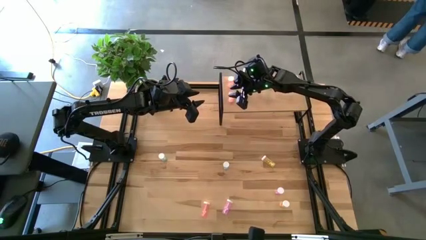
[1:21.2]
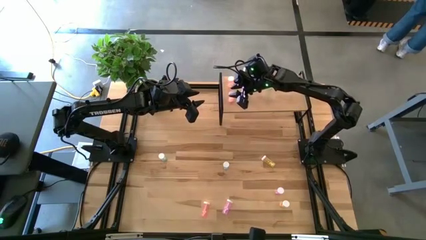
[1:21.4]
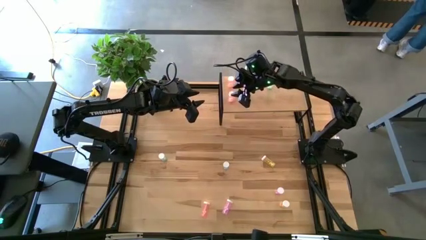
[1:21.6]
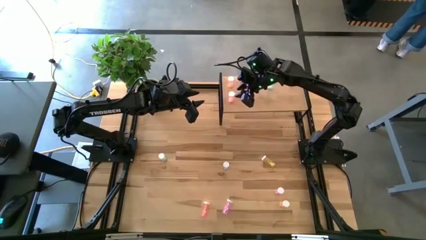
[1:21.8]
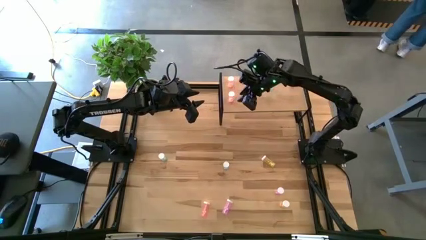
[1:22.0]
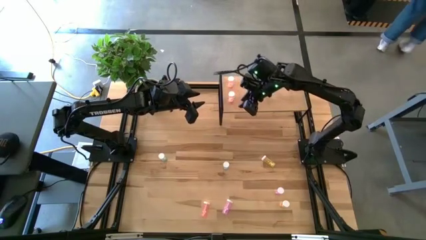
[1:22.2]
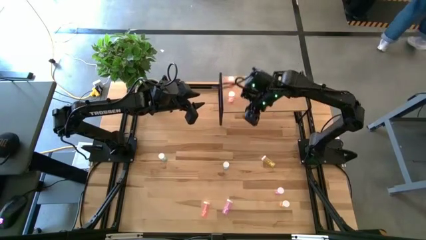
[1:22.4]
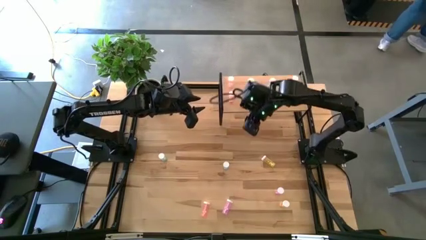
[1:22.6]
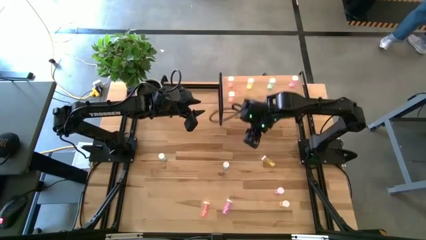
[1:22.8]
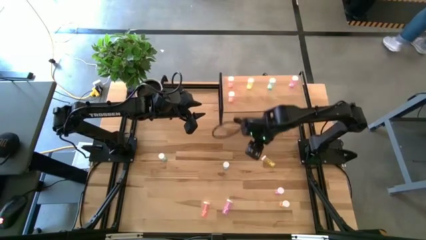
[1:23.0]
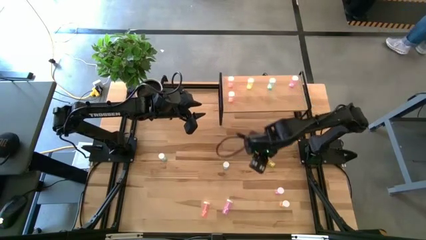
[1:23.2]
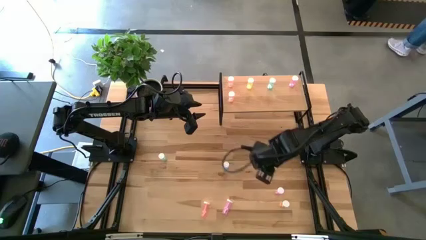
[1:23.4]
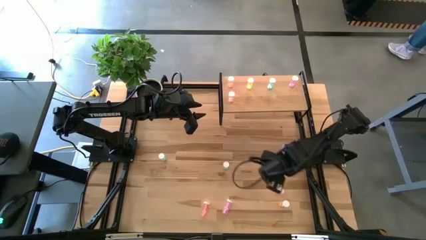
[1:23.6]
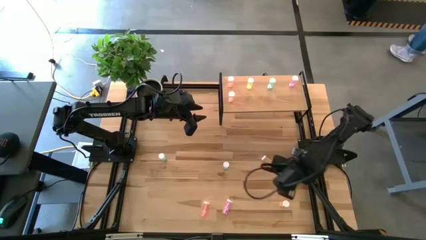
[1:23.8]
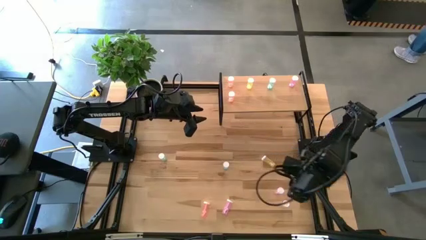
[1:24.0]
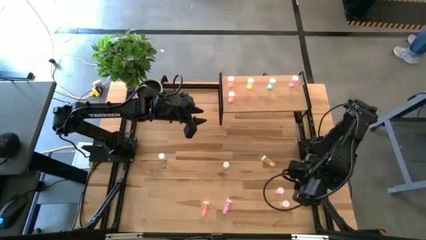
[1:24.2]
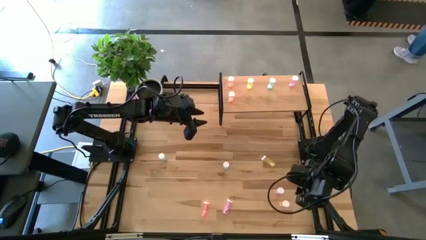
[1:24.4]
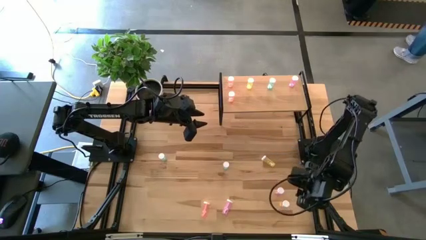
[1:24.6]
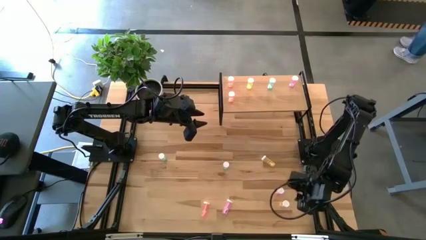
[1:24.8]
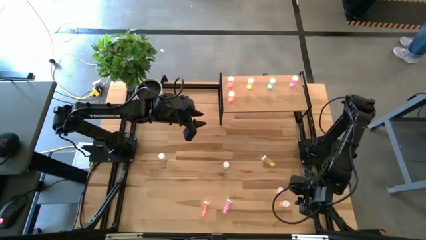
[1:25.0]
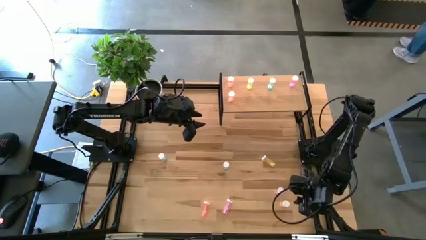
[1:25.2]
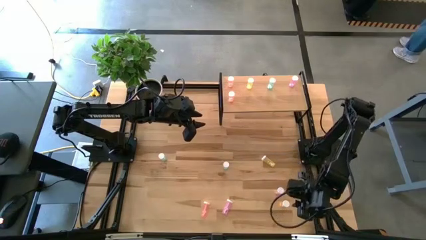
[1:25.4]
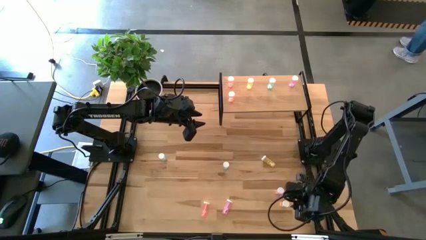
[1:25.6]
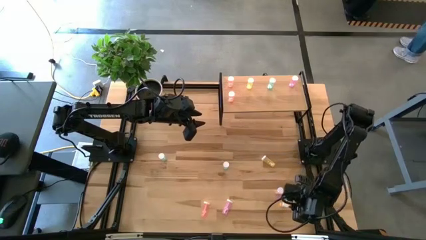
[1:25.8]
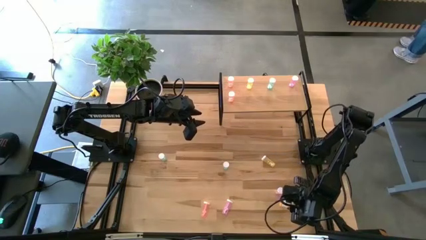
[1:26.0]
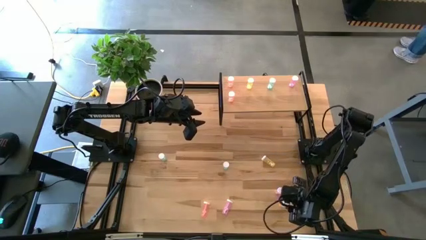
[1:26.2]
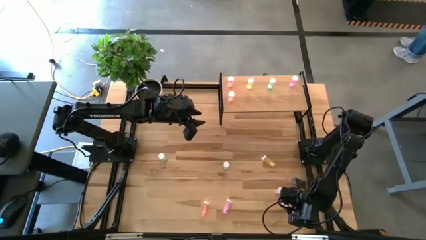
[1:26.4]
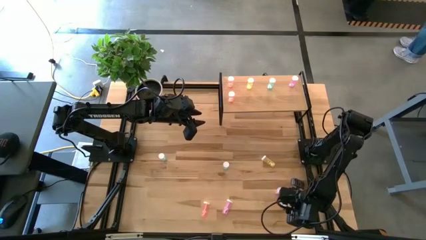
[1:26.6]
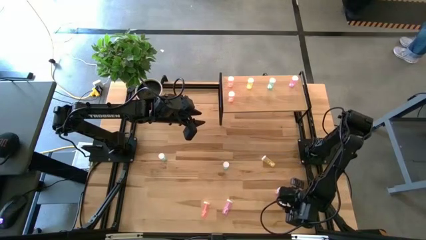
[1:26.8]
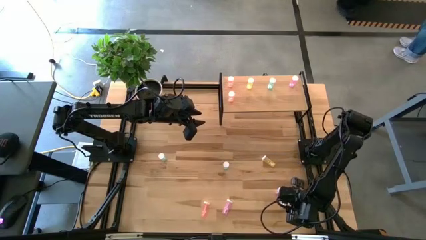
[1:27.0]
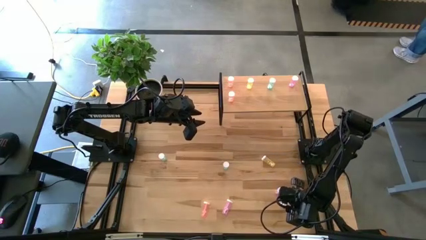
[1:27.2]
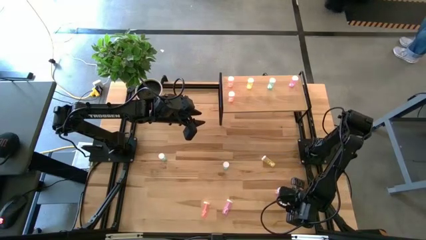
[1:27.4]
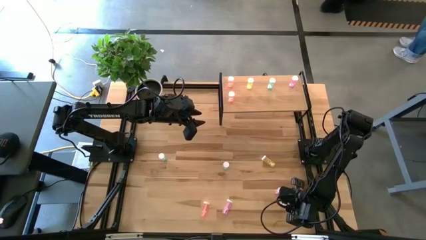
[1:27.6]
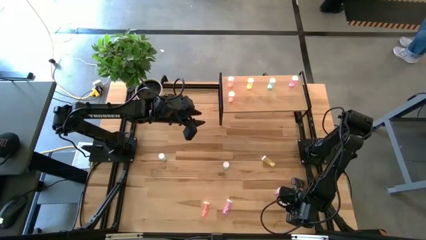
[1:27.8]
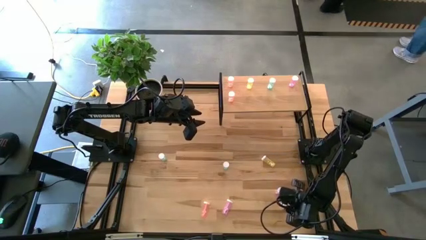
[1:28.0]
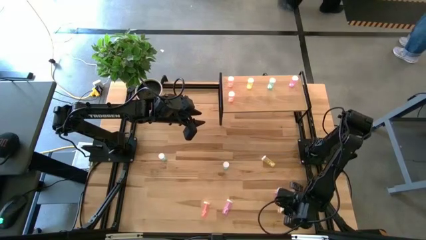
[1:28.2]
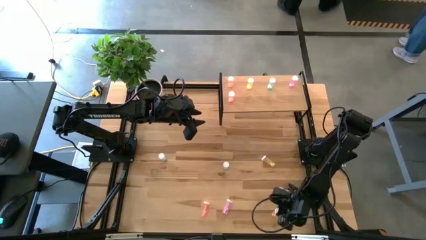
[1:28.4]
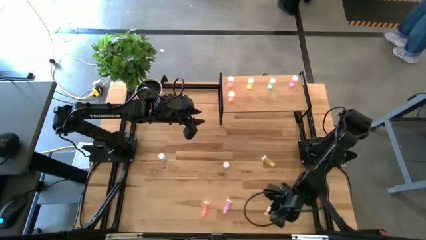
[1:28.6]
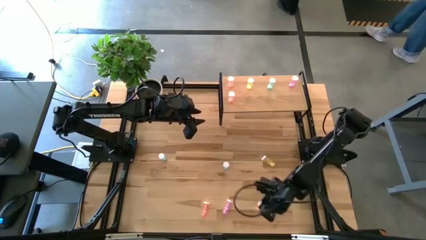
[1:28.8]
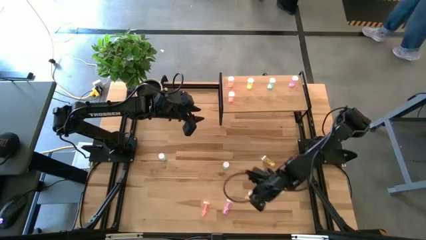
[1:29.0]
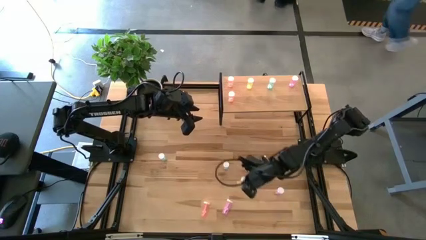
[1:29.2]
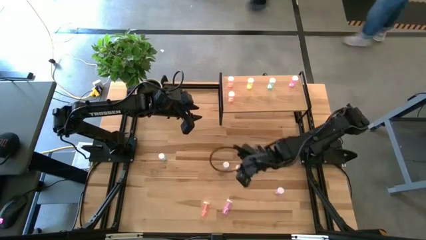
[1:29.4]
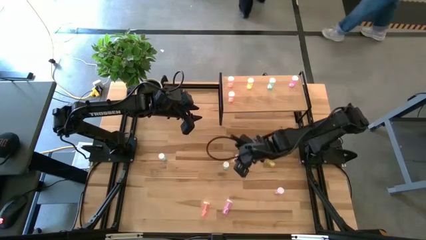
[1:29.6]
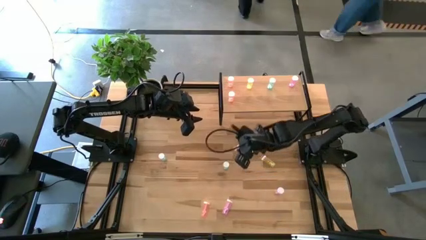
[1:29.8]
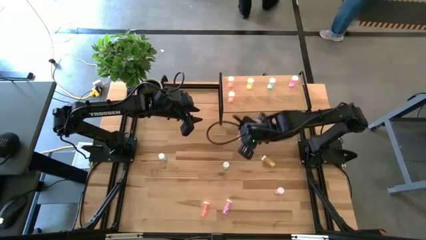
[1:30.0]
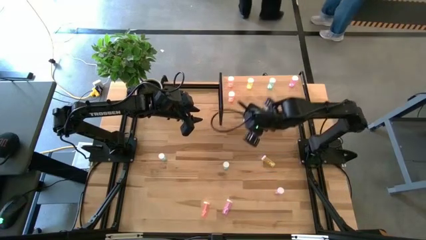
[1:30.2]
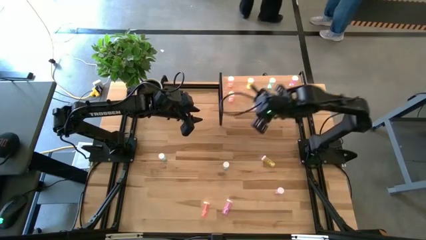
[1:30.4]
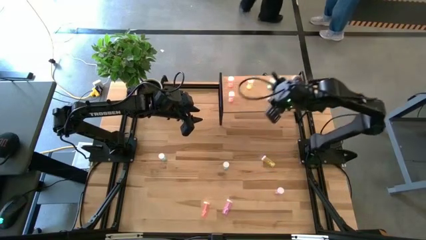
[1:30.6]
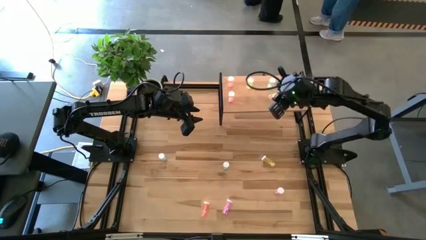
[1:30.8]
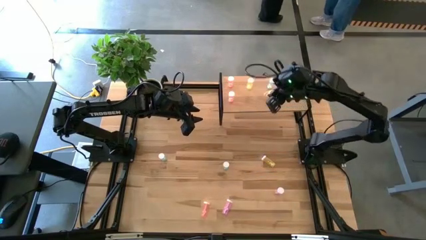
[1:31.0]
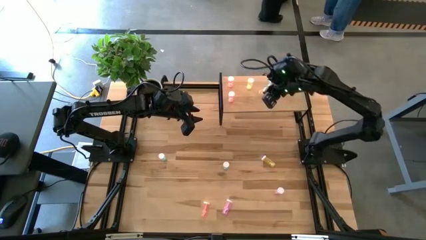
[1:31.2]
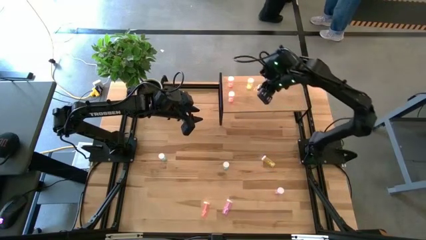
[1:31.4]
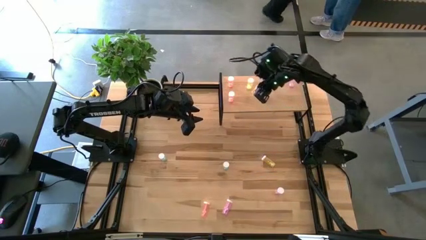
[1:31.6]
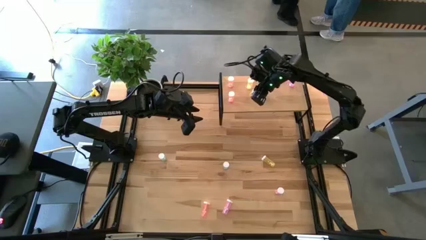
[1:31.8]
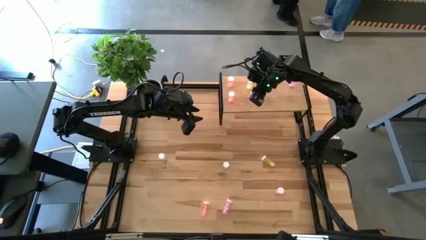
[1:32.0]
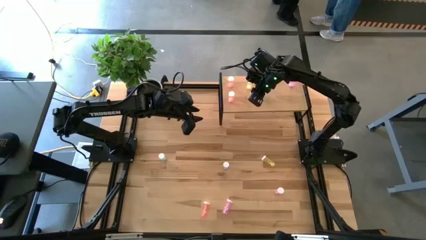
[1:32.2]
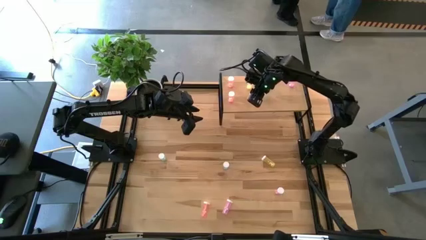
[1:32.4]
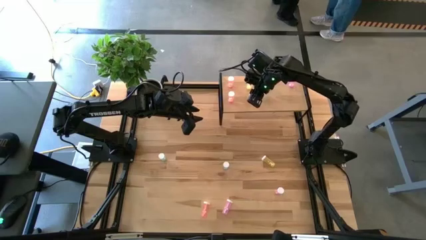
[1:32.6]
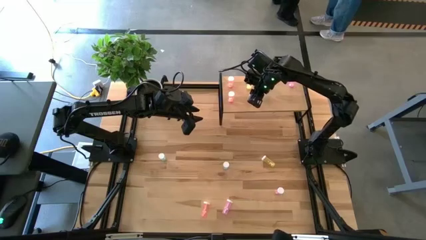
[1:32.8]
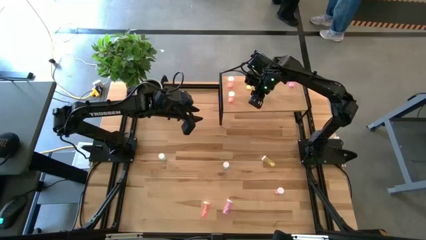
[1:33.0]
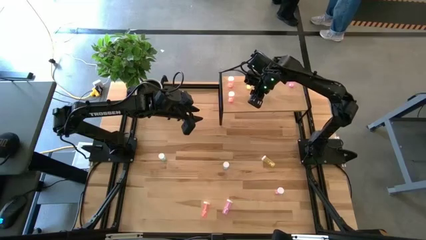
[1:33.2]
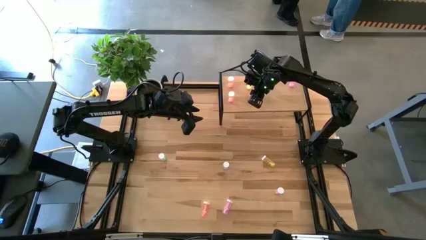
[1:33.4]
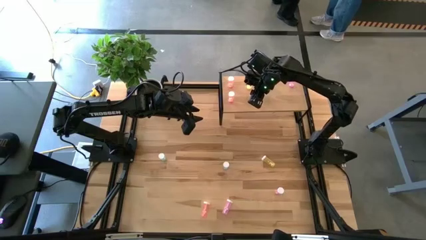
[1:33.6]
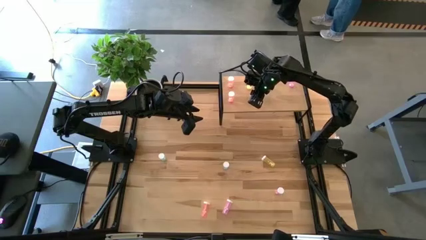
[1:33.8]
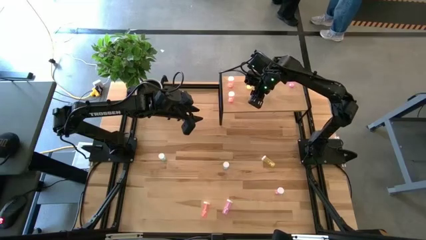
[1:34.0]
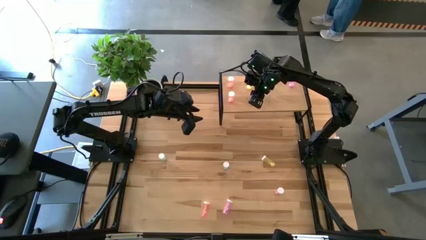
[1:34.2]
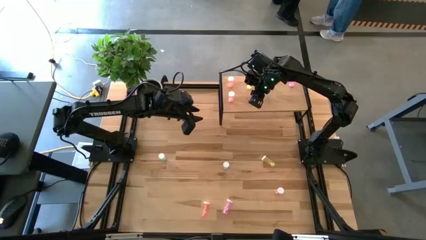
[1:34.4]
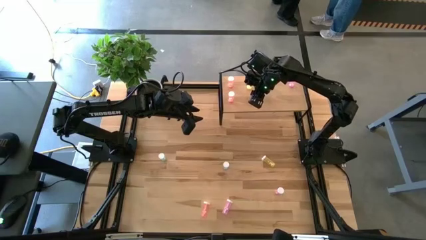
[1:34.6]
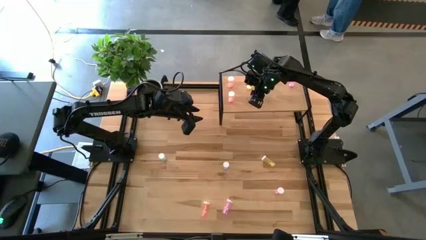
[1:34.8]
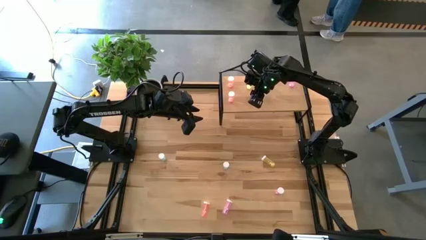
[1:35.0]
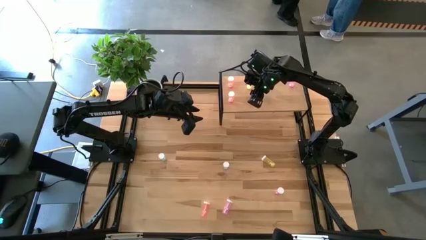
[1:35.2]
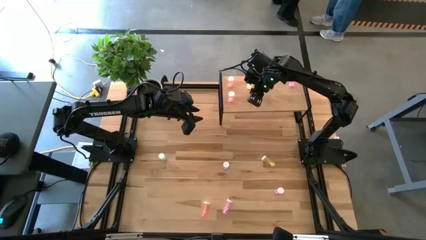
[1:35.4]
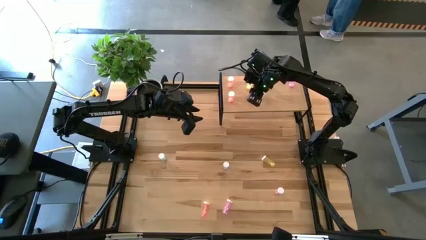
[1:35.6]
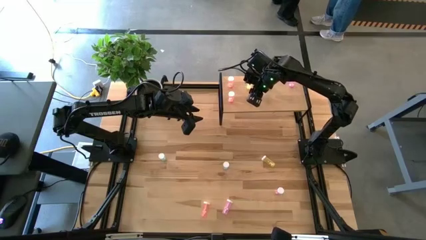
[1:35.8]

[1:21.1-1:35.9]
Task: Pick and place medicine bottles onto shelf by color
Put the bottom yellow pill bottle on the shelf aligned with the other yellow pill bottle

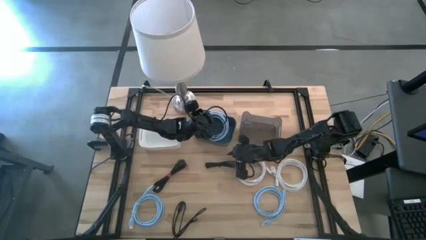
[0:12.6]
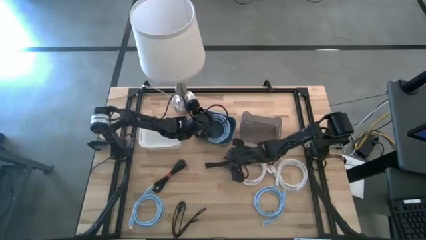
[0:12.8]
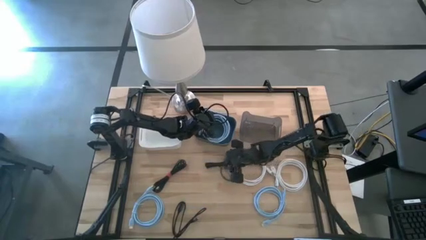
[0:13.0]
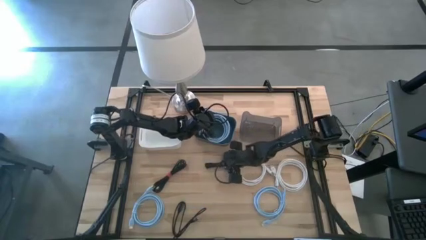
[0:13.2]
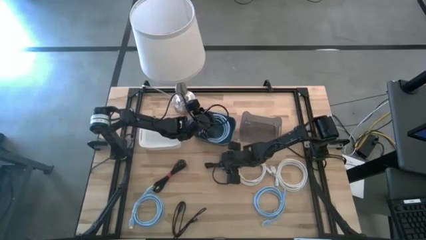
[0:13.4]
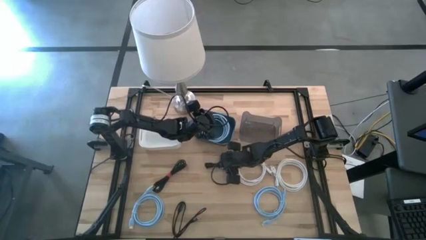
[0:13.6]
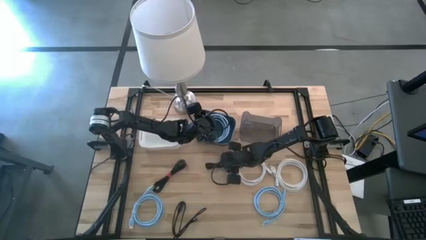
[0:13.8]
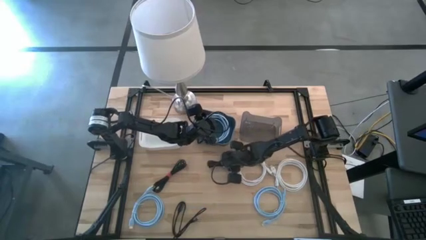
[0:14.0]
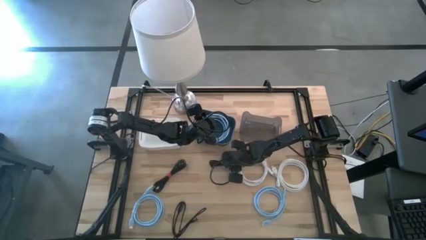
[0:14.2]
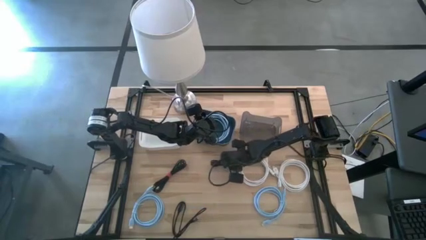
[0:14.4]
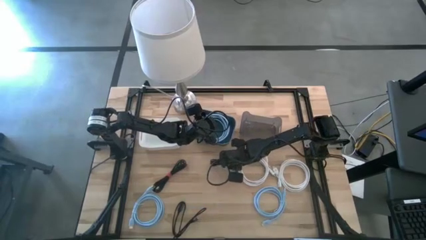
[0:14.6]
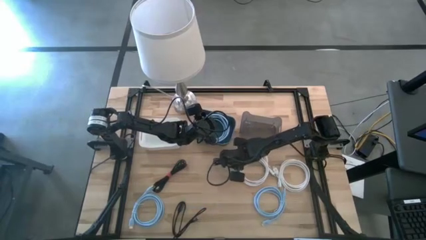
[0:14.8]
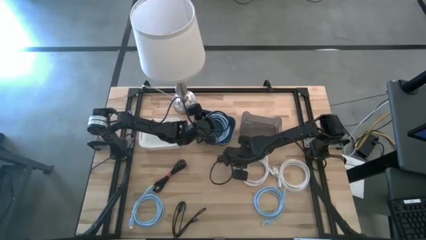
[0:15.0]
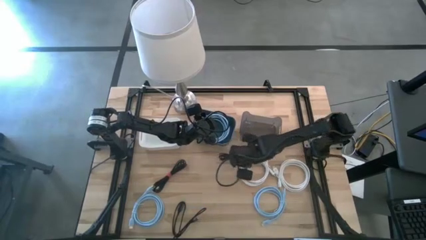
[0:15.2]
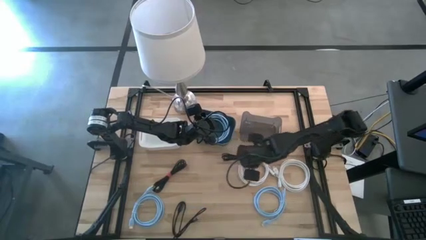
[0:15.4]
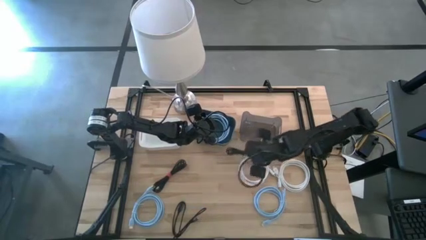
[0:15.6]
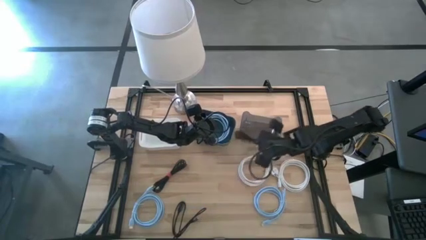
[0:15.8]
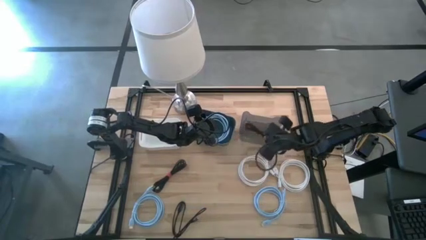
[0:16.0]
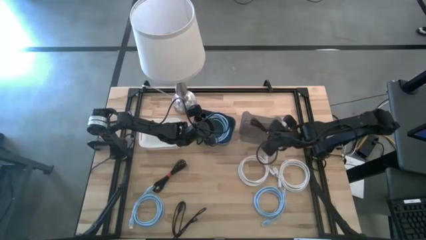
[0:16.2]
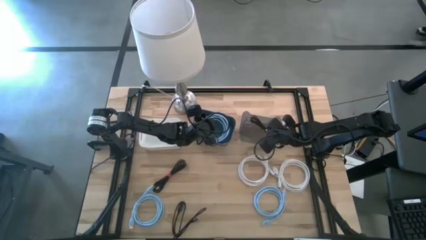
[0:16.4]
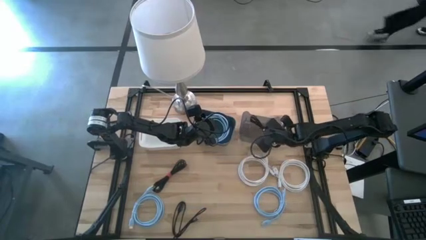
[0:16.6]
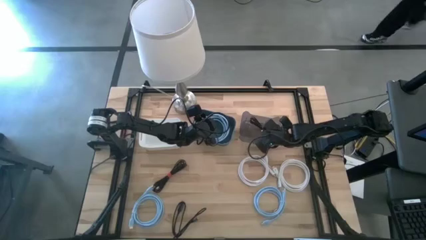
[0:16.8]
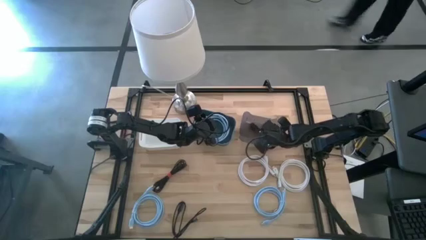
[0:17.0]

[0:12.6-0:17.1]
Task: Pick & Place USB Port
Put the right black charger cable into the black bin
